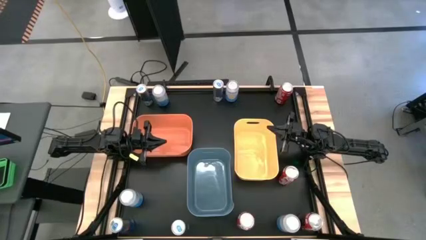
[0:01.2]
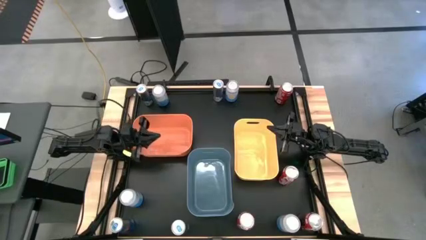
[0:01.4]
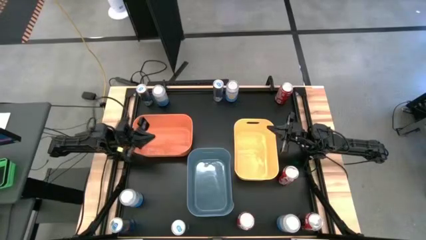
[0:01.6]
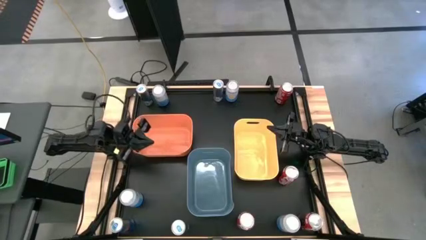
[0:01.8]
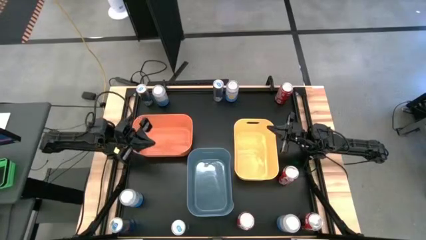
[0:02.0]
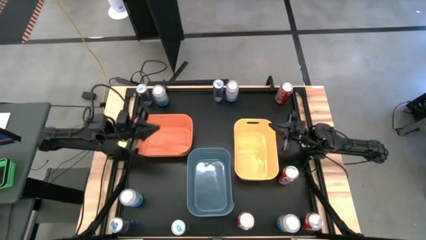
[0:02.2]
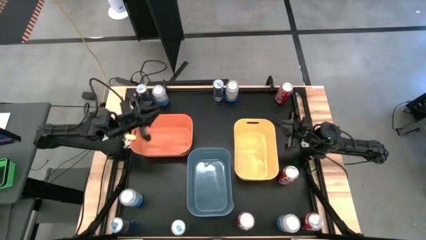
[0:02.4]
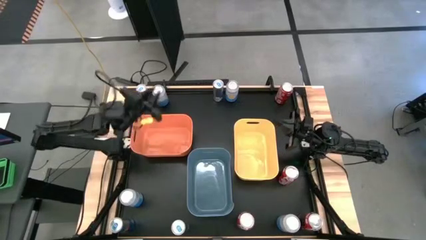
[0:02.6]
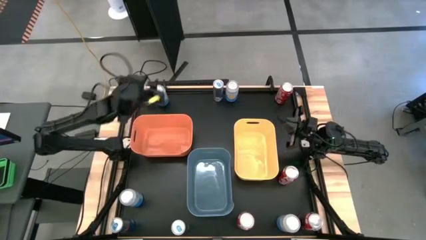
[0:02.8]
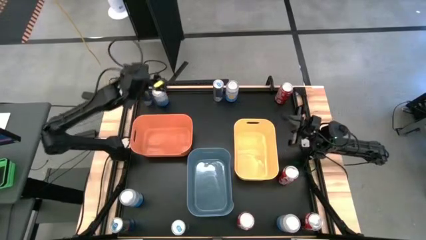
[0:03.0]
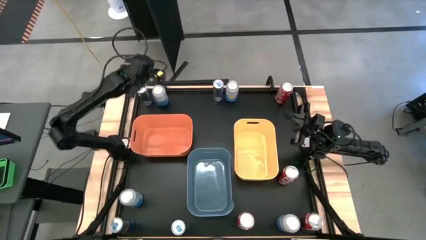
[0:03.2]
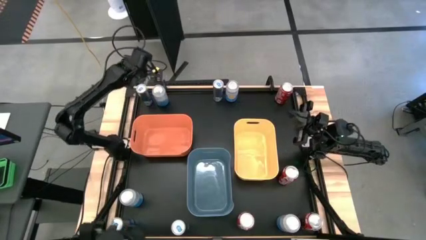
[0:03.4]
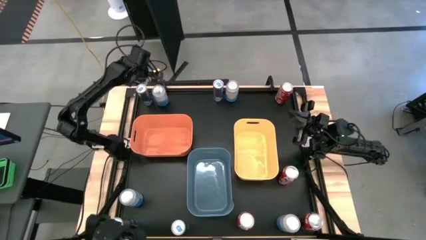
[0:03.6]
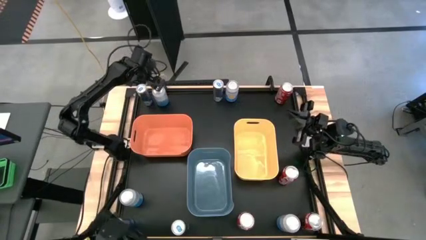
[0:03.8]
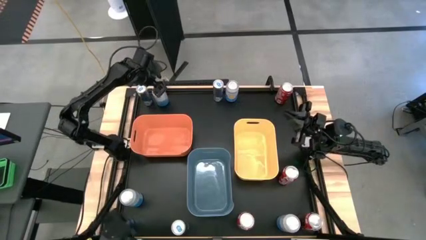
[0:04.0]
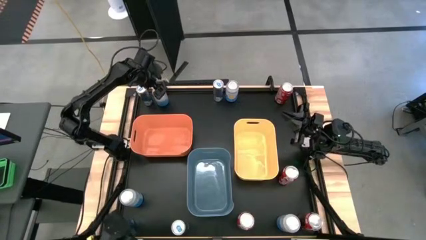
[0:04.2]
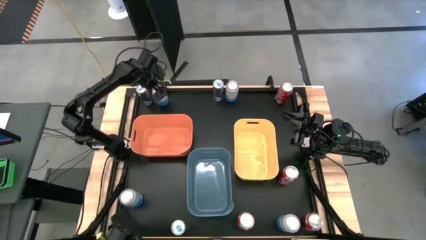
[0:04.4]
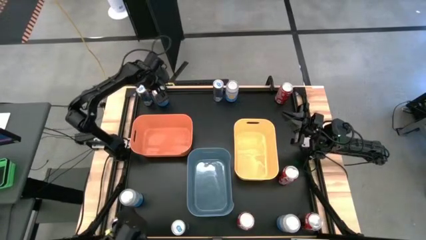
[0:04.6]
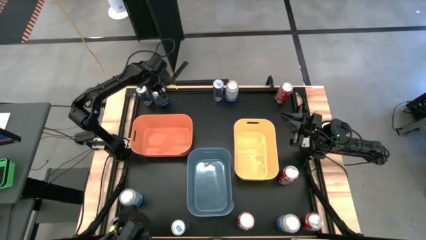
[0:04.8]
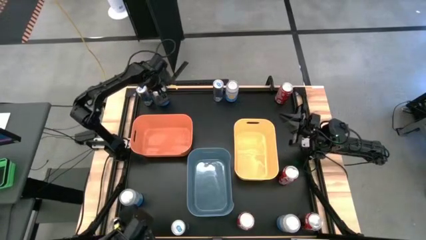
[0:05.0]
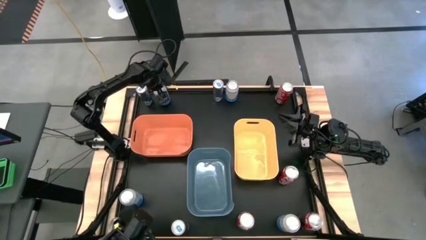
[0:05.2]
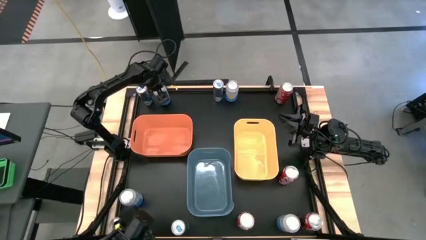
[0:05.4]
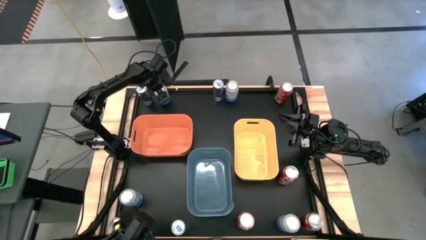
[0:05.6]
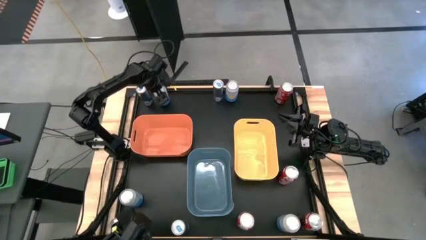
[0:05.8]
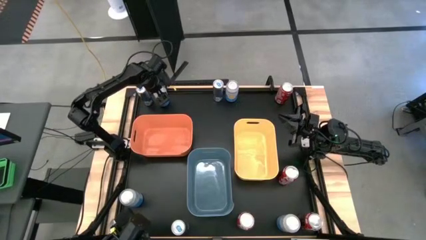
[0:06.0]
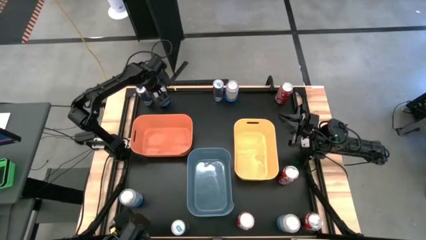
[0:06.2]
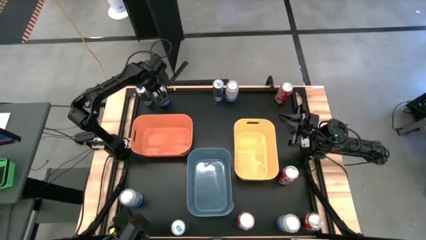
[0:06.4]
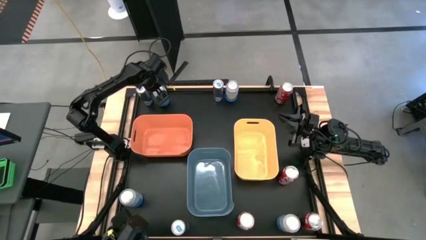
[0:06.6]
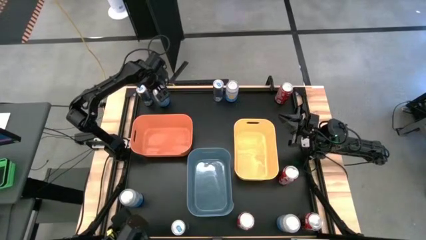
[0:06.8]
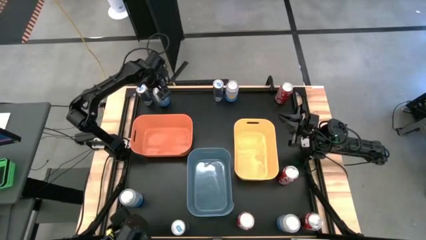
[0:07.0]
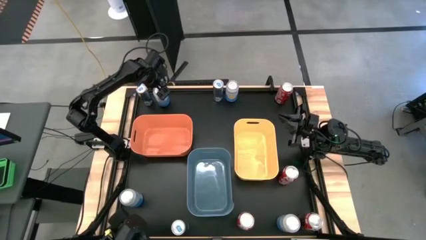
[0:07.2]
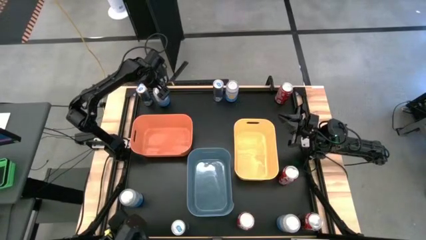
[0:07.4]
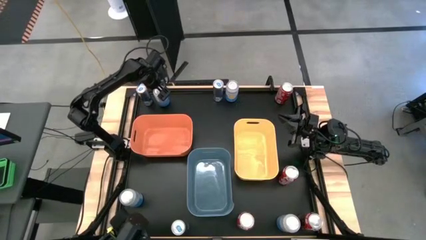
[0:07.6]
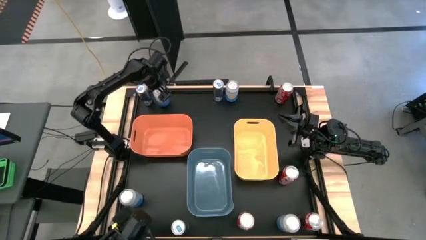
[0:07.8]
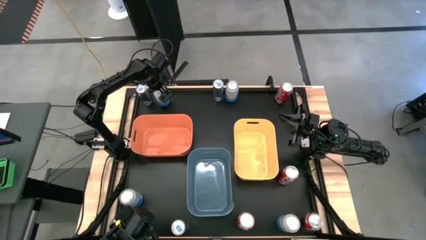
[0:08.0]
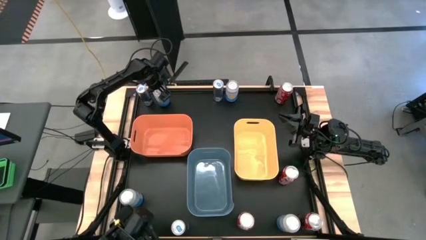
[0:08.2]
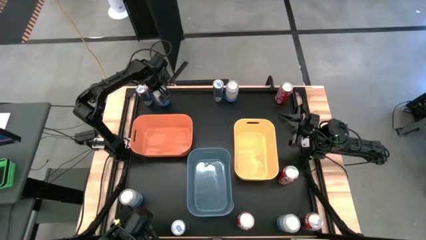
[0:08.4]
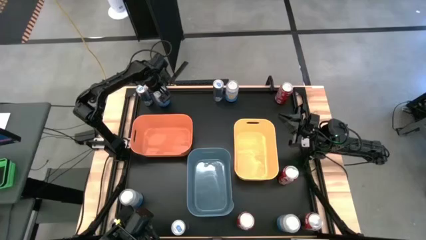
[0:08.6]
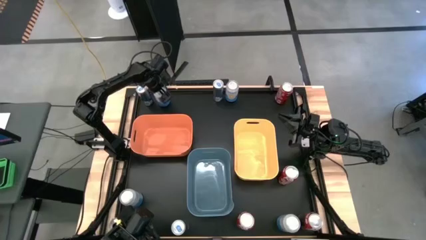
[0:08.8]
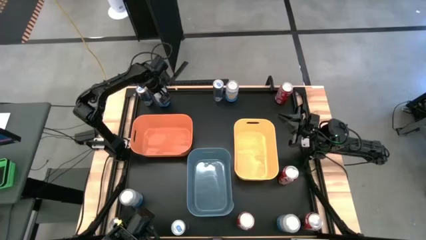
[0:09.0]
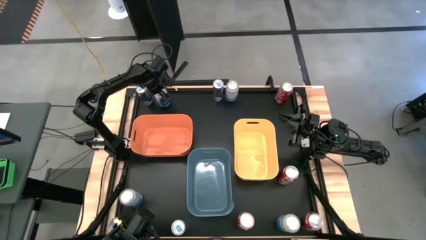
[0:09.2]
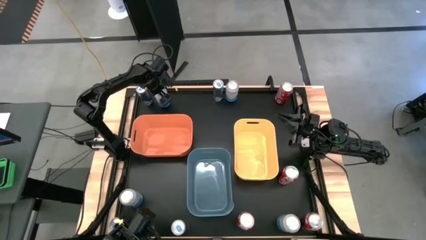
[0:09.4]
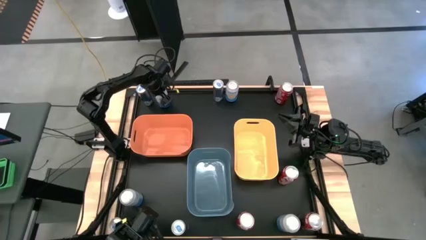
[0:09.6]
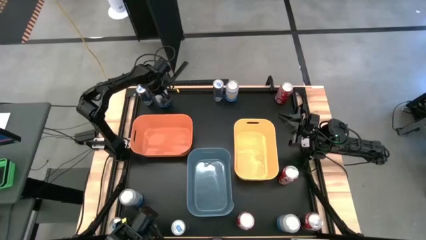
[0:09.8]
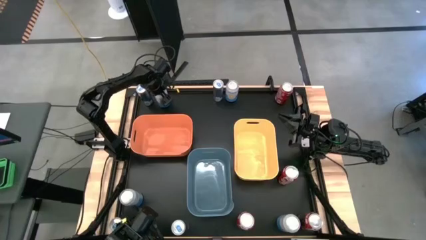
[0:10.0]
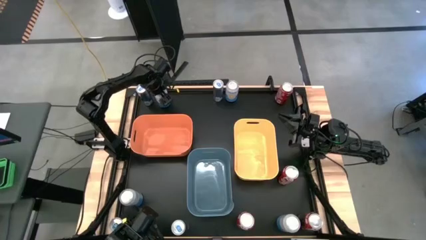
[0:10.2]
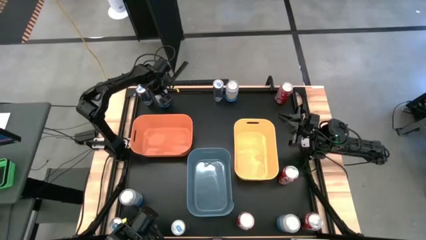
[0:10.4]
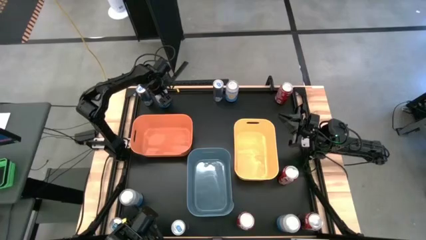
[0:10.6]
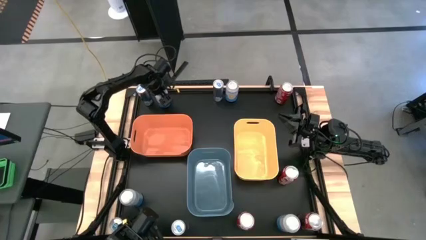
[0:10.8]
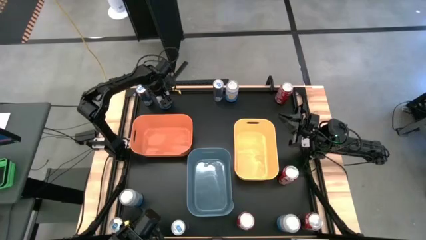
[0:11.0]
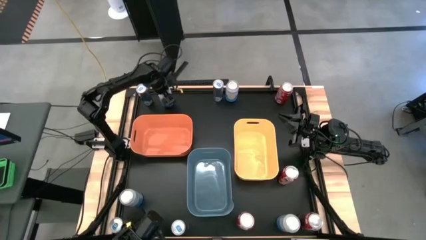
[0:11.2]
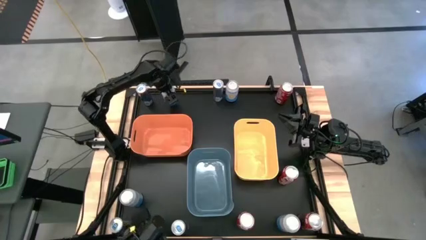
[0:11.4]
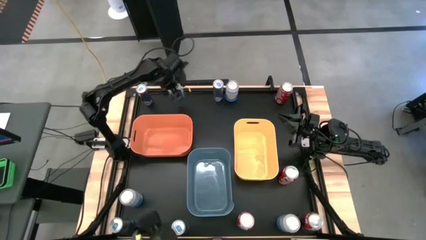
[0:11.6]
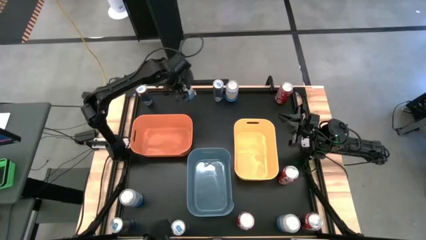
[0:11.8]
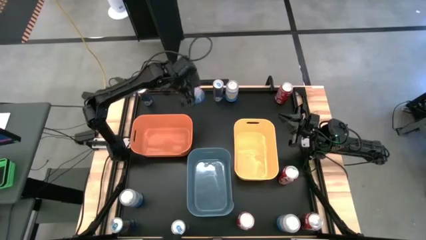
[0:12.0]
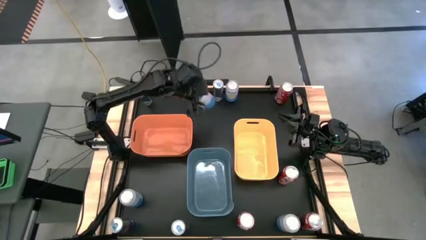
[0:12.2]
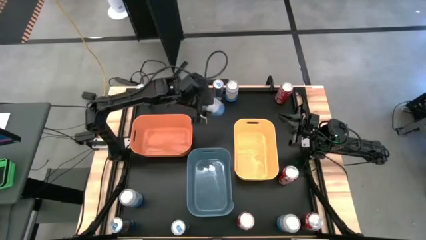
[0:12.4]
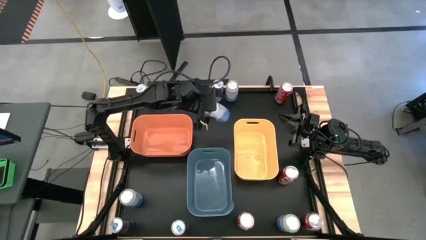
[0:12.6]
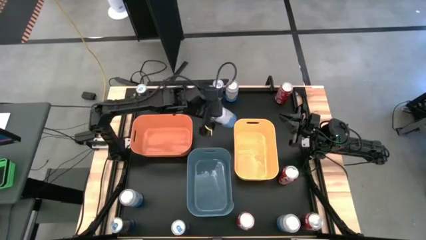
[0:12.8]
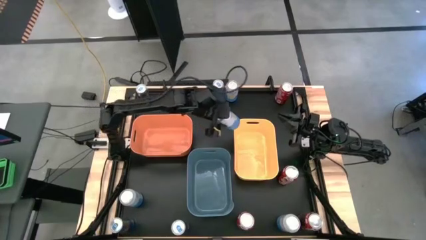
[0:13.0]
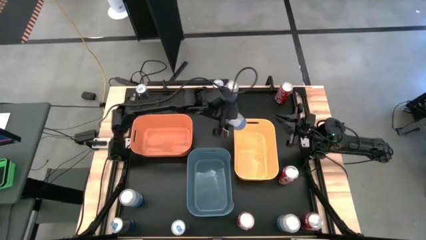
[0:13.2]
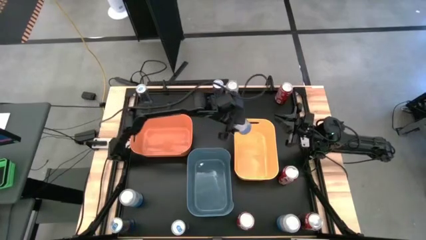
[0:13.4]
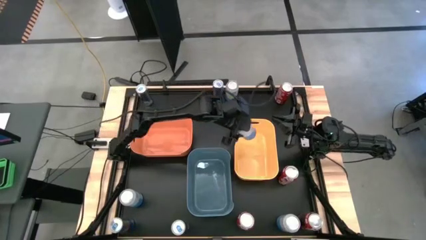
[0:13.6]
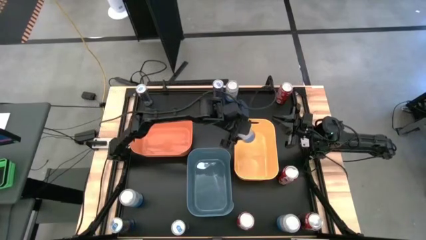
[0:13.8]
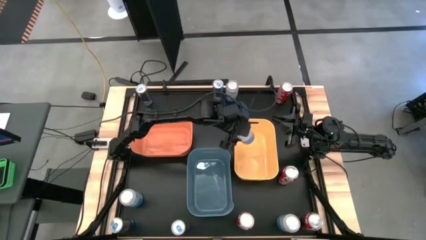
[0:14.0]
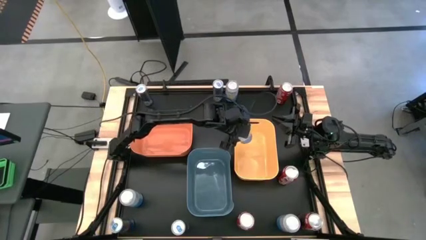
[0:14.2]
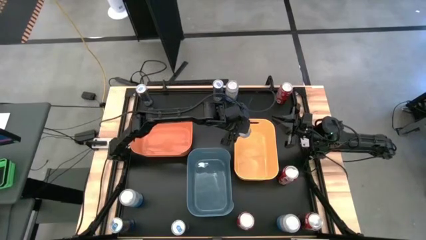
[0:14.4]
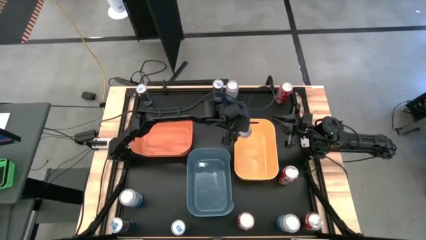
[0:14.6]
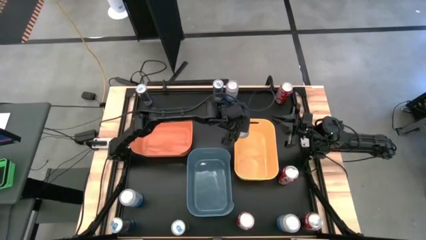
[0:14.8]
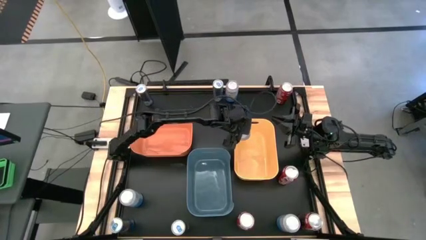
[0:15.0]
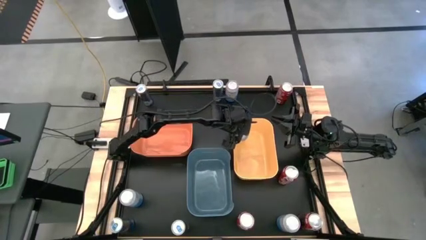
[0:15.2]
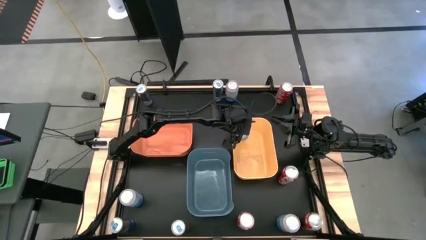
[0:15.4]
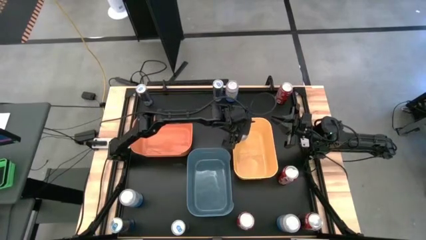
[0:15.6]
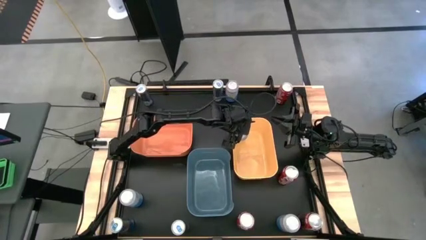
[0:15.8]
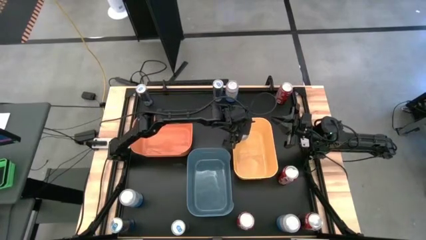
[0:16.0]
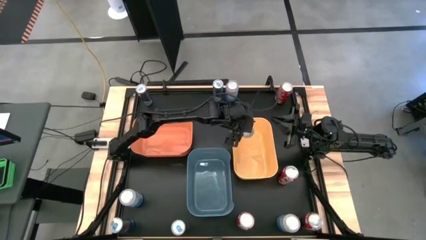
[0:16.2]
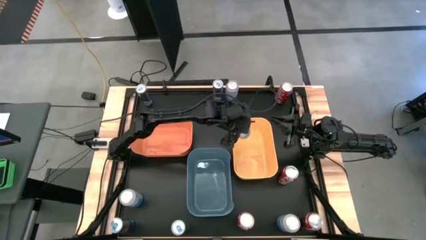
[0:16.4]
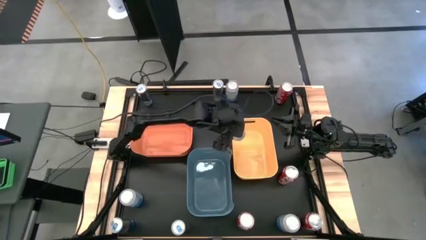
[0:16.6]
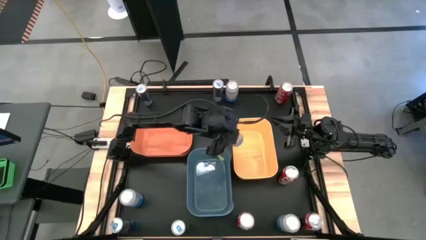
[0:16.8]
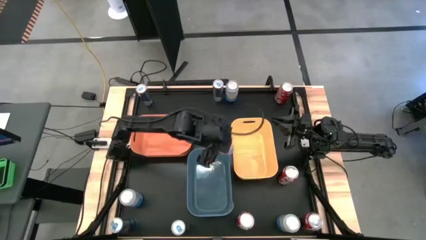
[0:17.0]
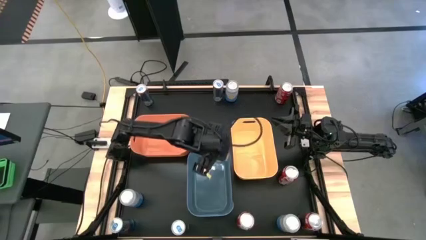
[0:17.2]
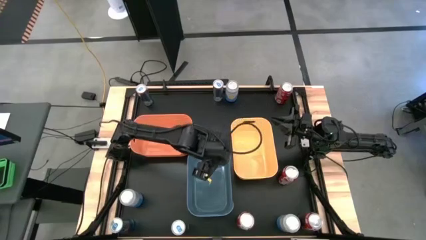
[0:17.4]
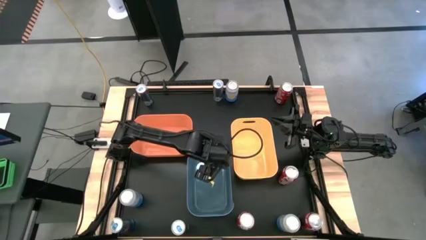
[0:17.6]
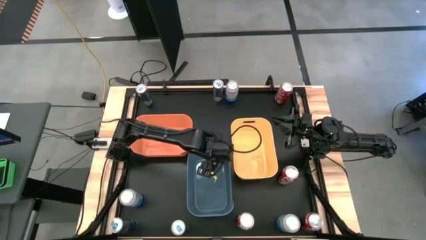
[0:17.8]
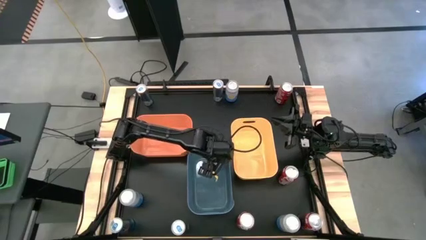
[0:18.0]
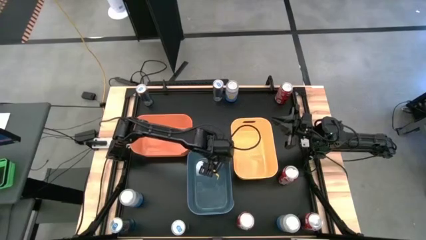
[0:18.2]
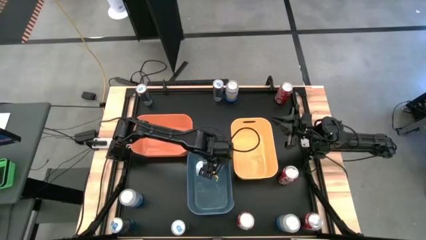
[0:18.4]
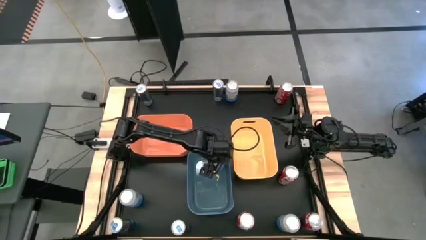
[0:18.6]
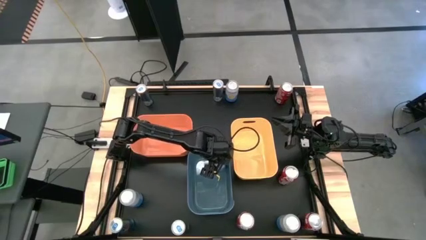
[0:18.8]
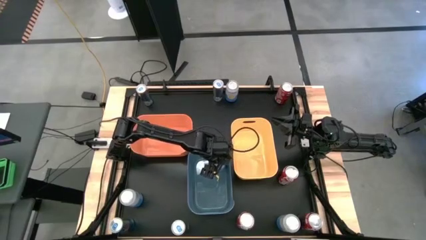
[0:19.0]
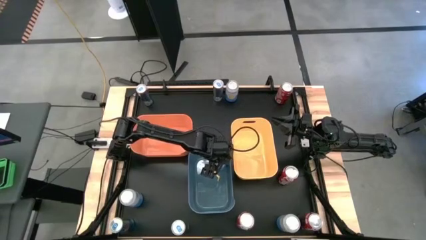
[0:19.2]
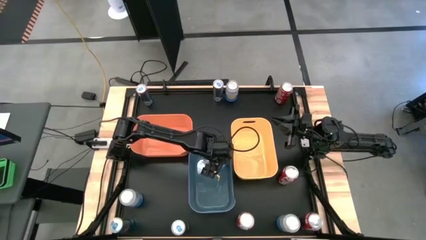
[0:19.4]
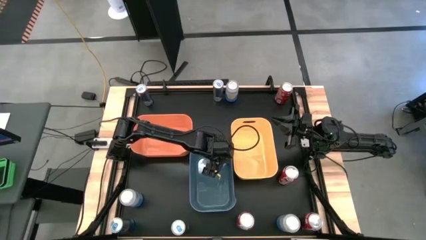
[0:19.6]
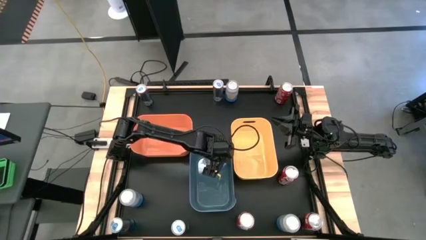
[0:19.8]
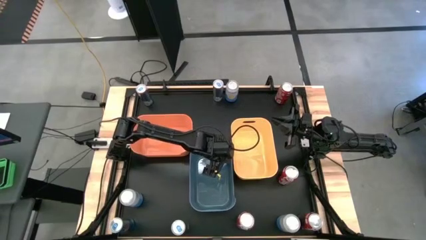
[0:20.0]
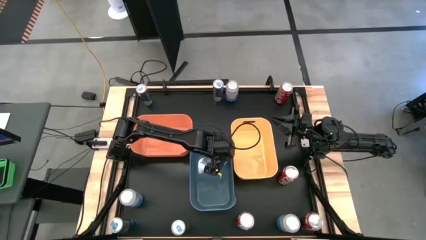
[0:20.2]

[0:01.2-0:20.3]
Task: Sort soda cans
Put the top left blue-white soda can into the blue bin
